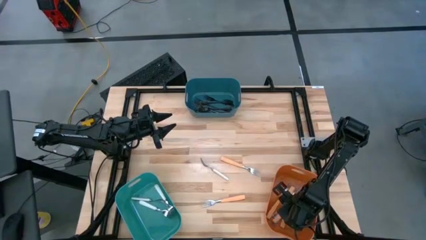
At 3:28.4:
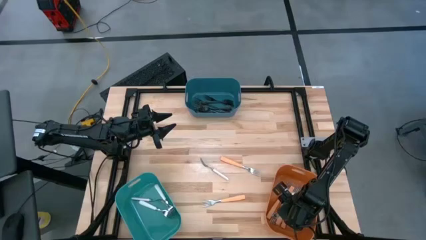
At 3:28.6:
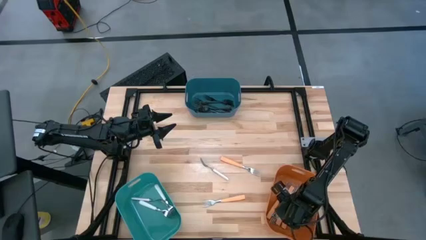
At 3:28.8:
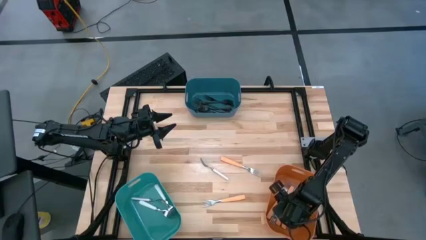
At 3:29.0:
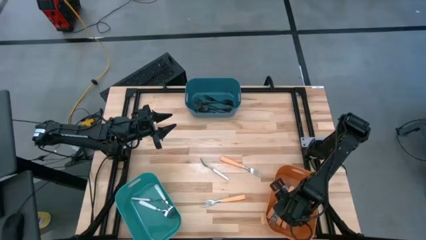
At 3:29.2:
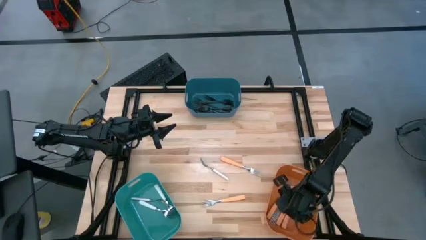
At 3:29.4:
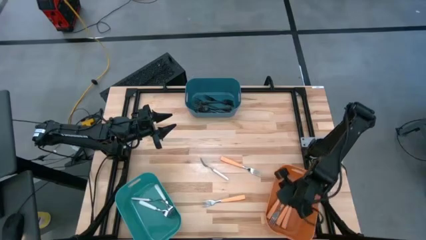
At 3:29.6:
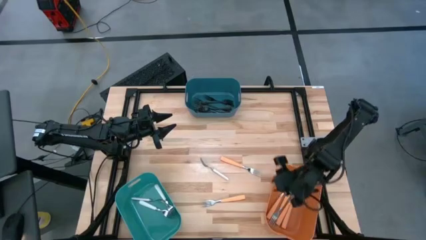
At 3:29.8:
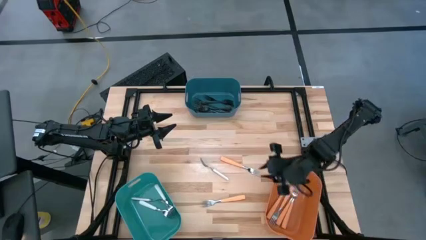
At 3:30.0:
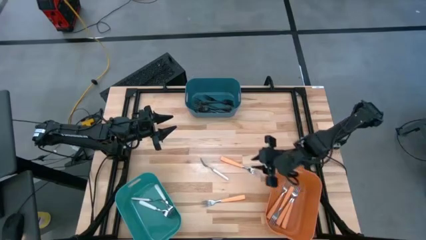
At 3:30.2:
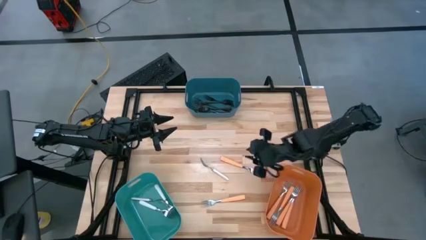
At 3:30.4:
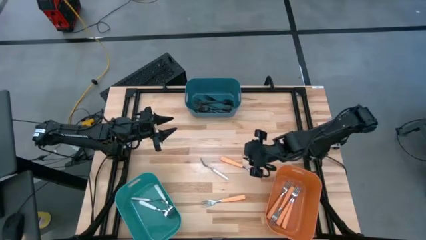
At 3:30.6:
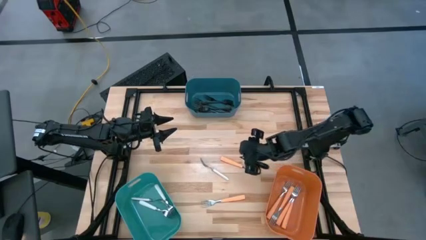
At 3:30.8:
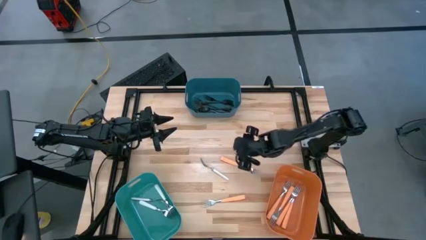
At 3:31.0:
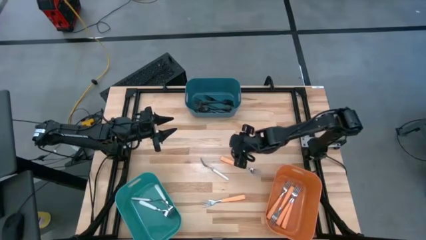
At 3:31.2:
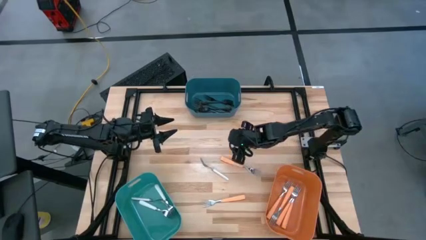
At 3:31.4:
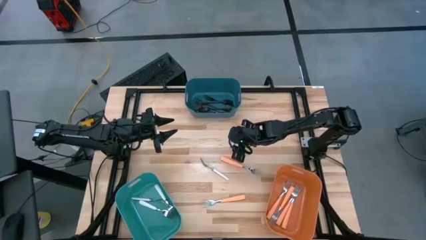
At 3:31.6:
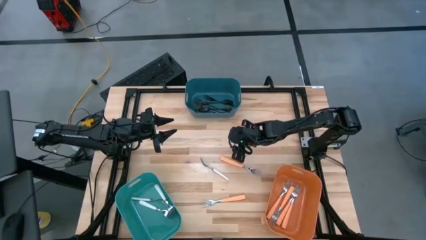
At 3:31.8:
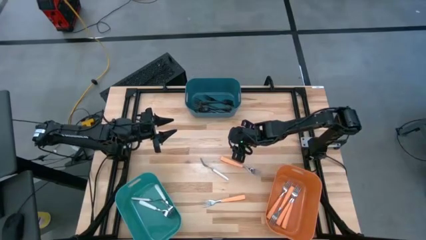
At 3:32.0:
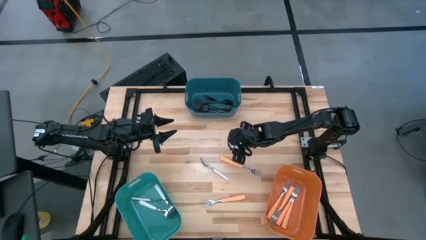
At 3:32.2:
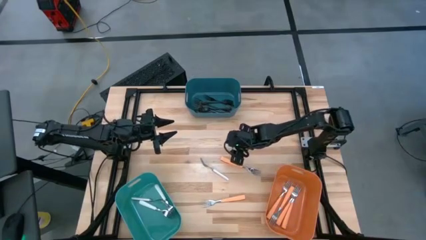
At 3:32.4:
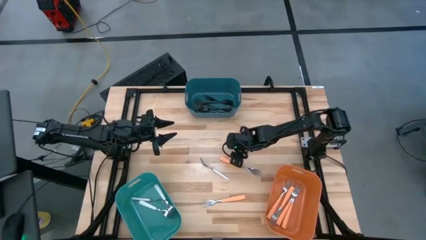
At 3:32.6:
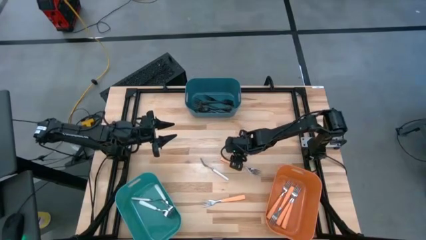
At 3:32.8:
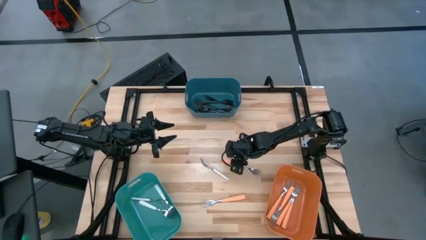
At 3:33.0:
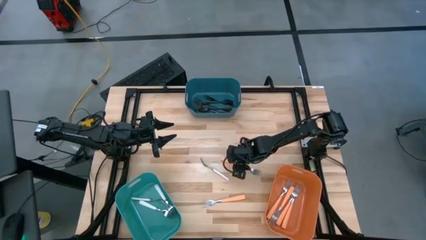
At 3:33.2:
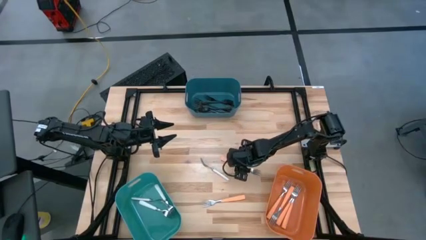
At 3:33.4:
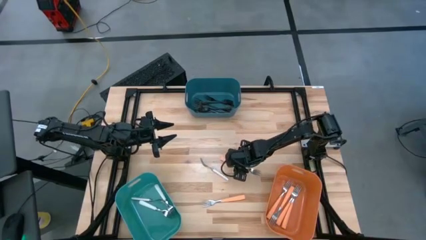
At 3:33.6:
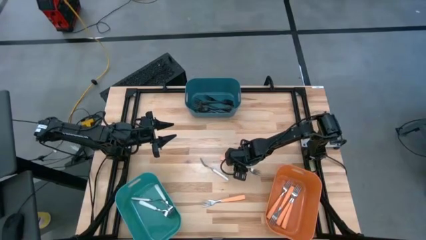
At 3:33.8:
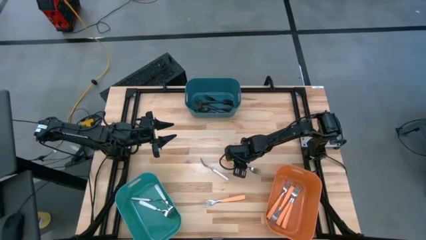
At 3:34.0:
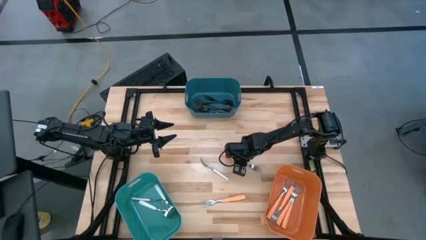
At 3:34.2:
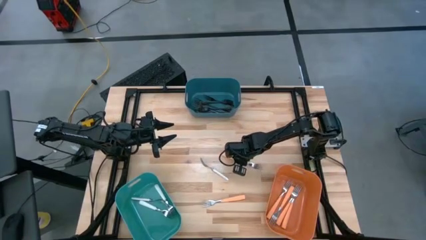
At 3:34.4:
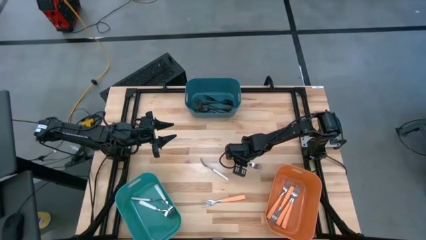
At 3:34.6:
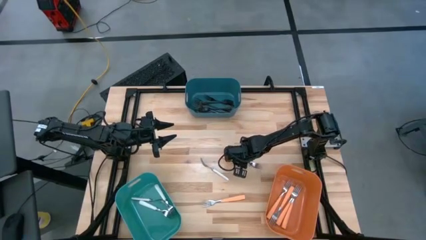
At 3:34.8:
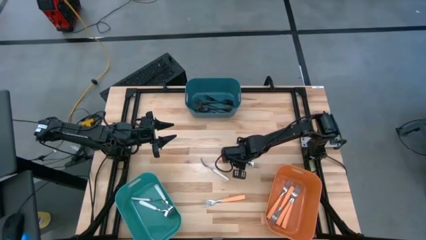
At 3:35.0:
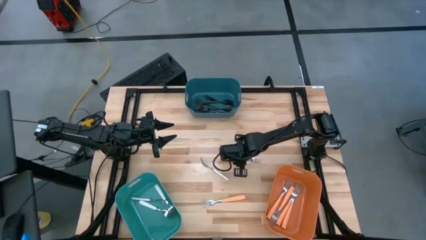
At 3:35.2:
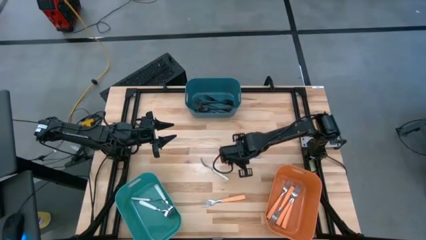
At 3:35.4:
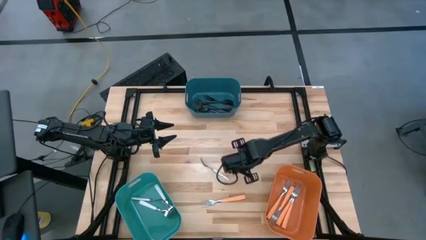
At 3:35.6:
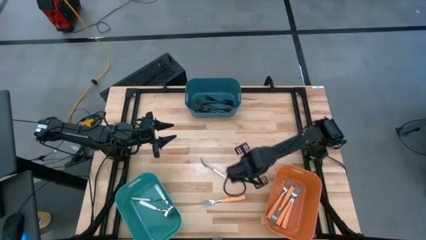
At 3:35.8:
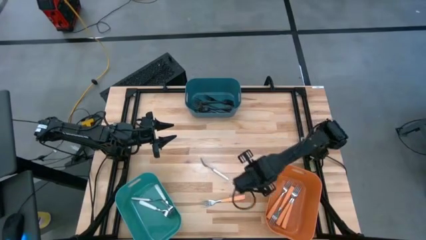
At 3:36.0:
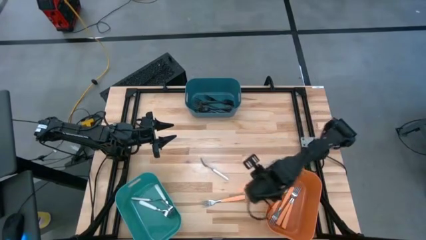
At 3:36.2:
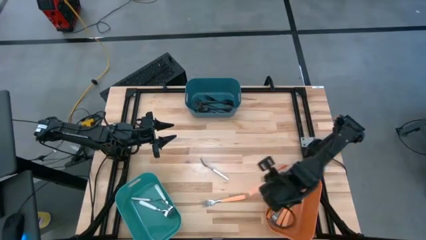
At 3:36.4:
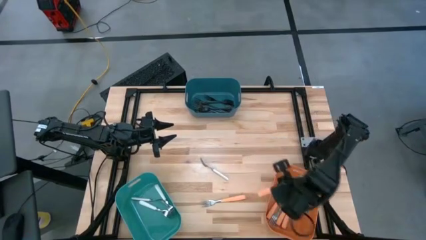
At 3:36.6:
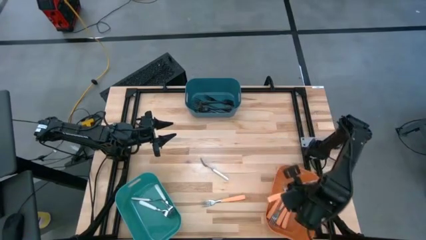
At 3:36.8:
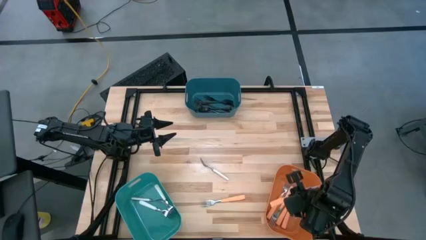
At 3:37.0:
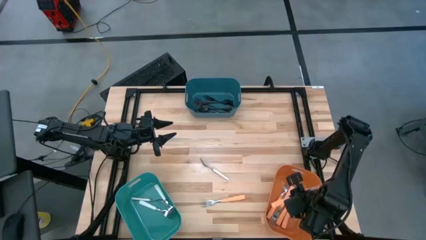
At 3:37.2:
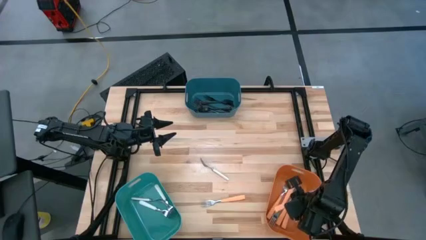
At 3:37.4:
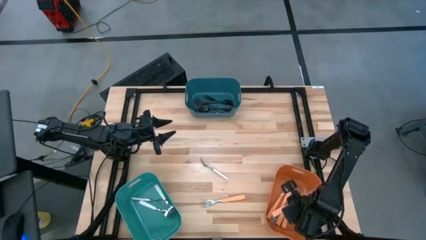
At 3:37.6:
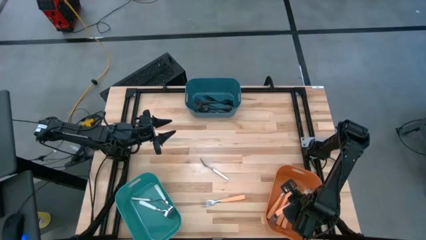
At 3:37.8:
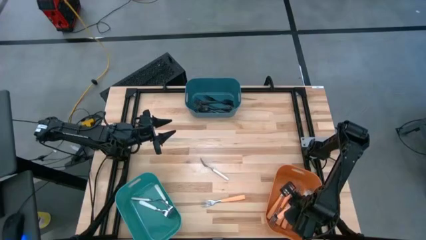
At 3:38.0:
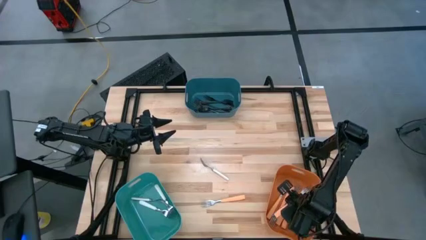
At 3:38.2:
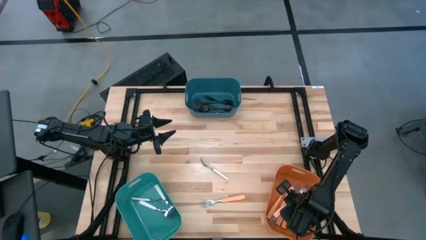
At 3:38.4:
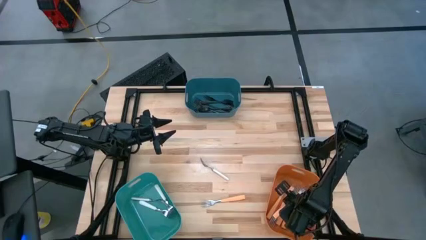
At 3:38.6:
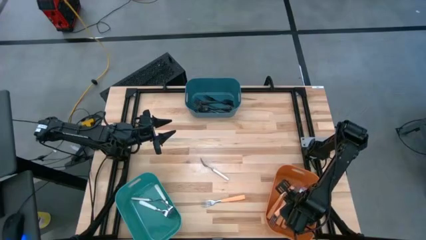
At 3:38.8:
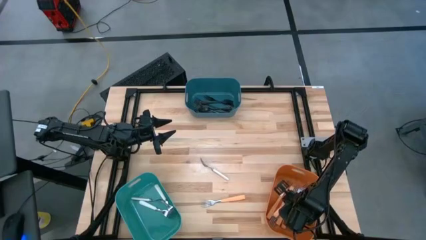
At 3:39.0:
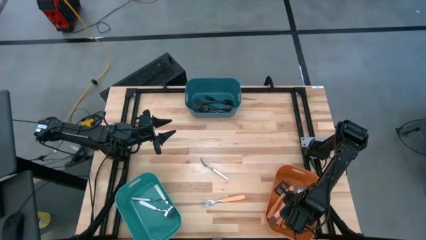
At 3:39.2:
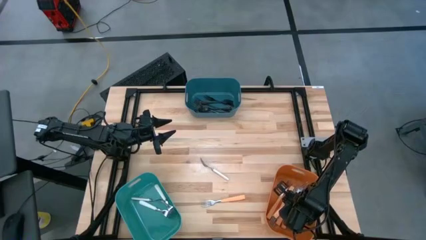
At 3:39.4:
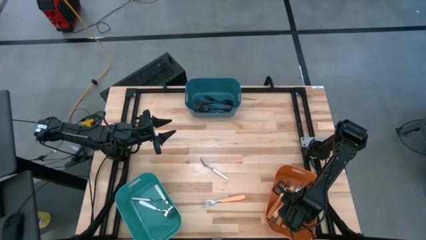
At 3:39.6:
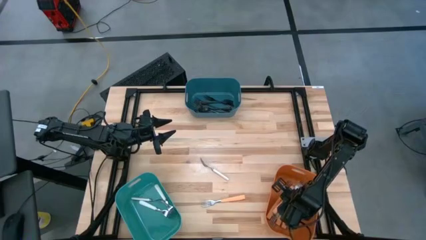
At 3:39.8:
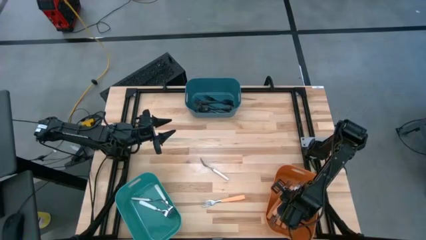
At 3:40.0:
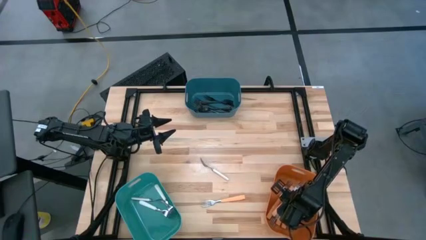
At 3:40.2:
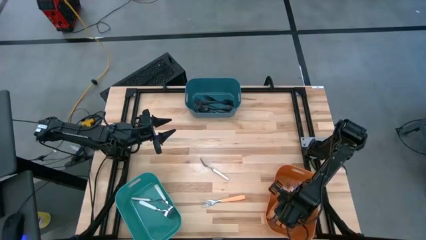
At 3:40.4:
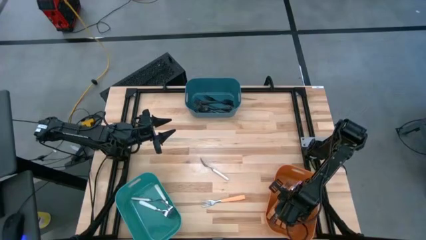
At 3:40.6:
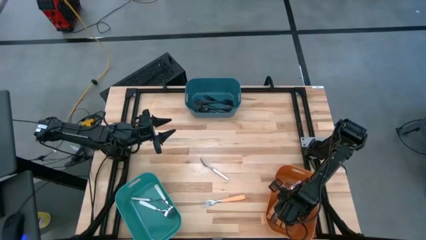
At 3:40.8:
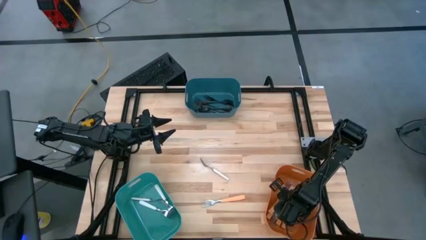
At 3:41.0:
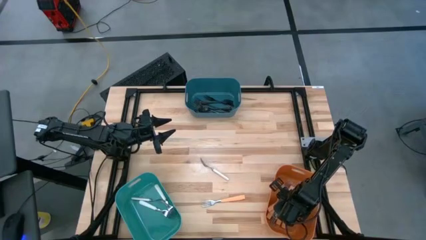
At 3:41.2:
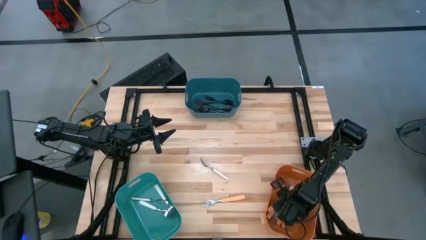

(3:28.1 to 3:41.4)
Task: Sort silverware by color (type)
Put the orange fork into the bottom left orange bin
